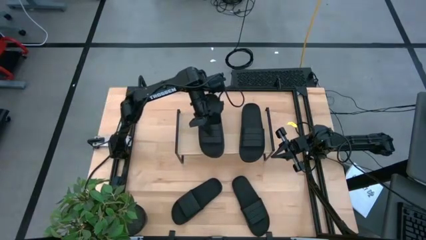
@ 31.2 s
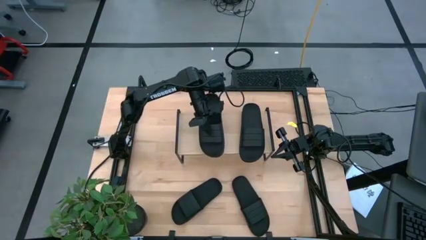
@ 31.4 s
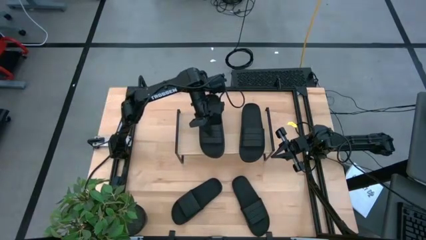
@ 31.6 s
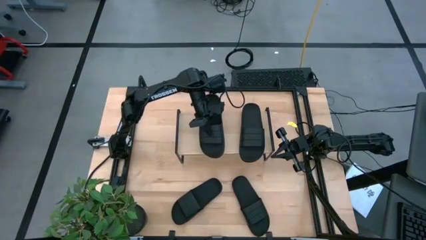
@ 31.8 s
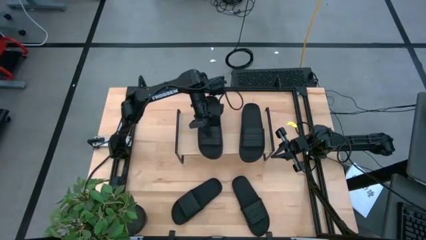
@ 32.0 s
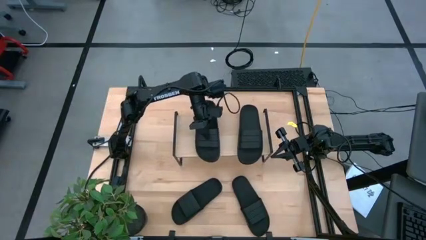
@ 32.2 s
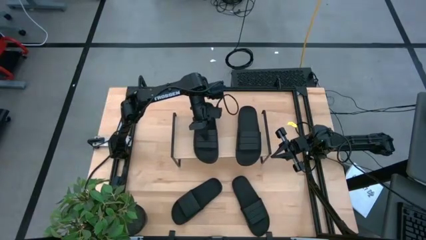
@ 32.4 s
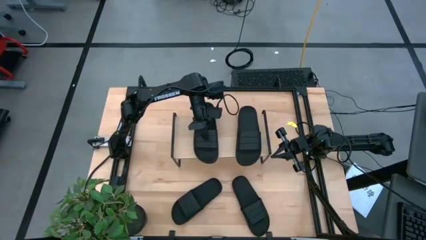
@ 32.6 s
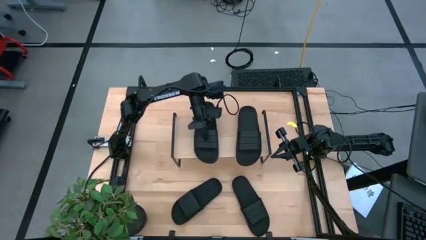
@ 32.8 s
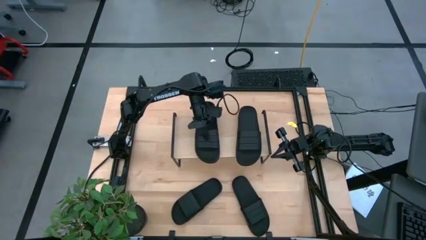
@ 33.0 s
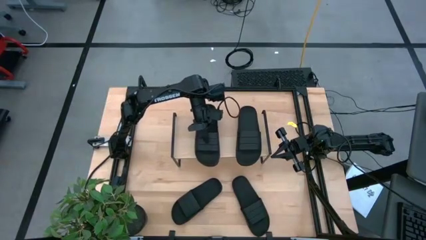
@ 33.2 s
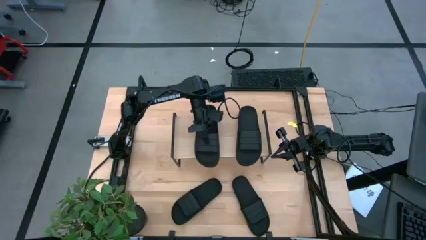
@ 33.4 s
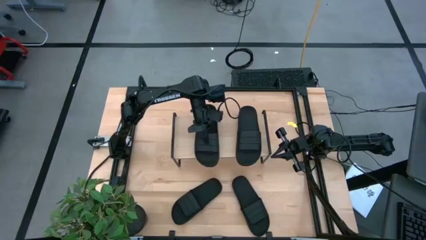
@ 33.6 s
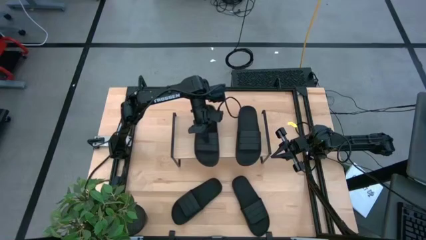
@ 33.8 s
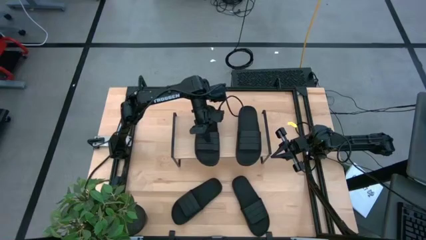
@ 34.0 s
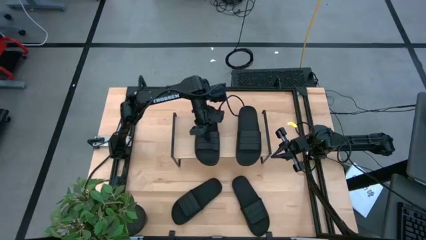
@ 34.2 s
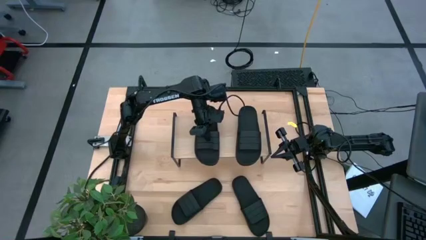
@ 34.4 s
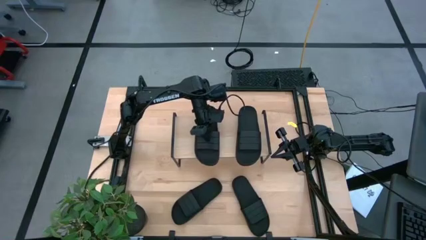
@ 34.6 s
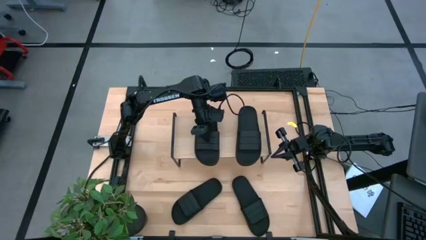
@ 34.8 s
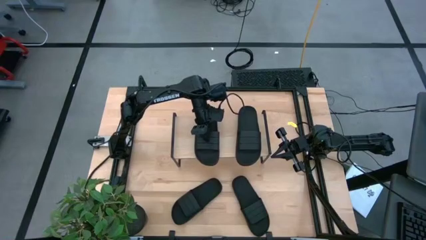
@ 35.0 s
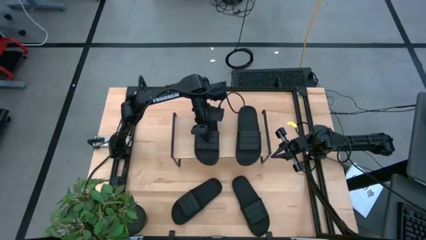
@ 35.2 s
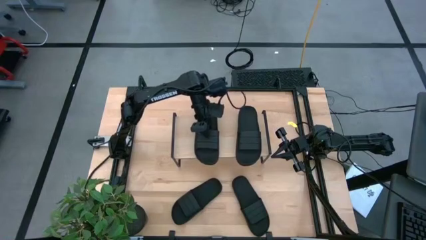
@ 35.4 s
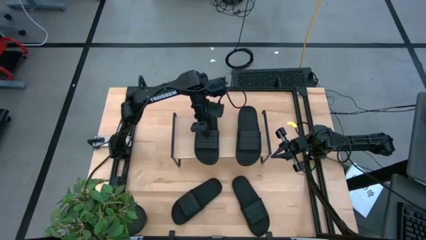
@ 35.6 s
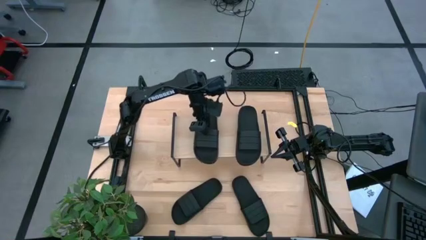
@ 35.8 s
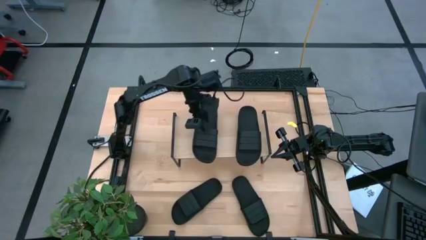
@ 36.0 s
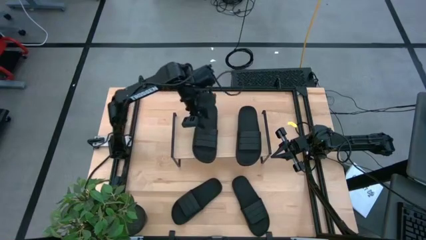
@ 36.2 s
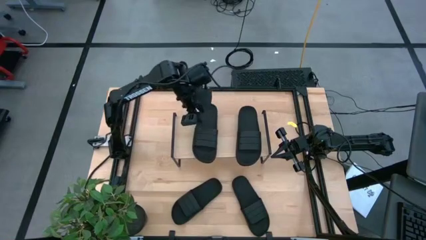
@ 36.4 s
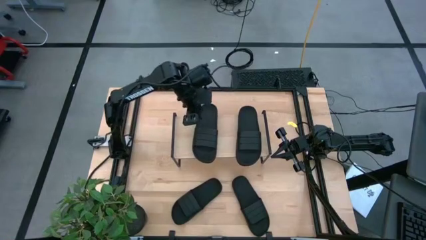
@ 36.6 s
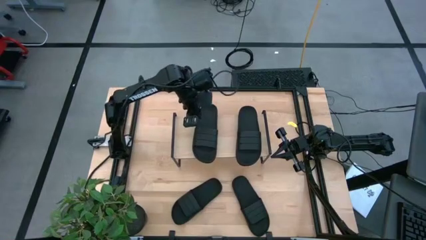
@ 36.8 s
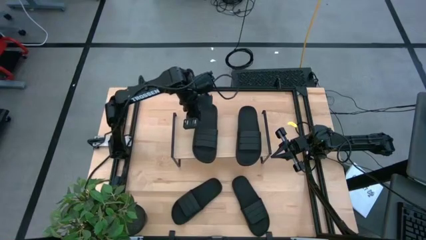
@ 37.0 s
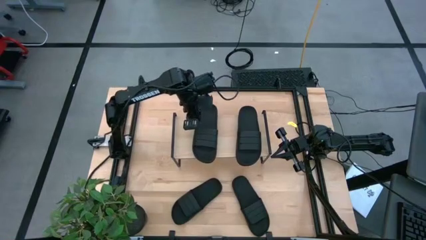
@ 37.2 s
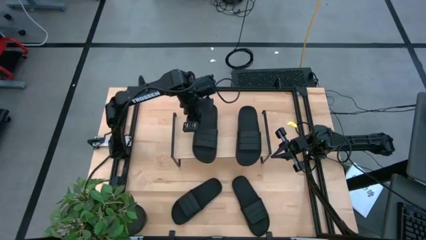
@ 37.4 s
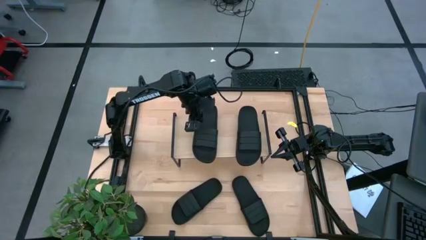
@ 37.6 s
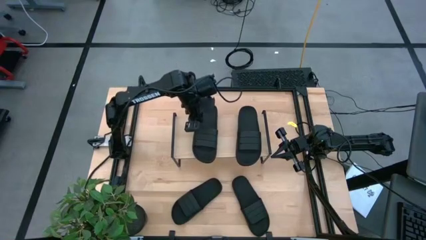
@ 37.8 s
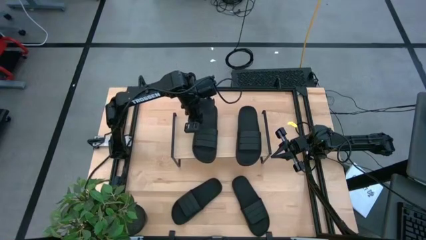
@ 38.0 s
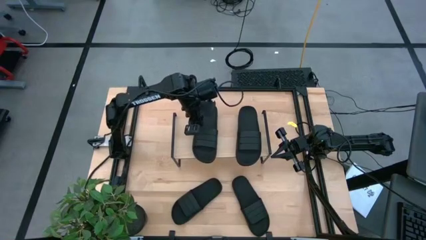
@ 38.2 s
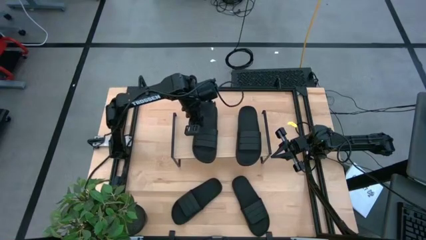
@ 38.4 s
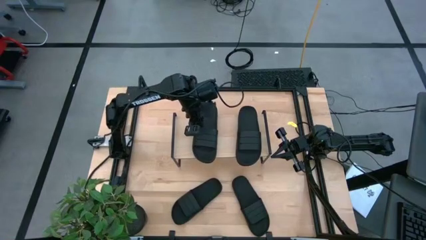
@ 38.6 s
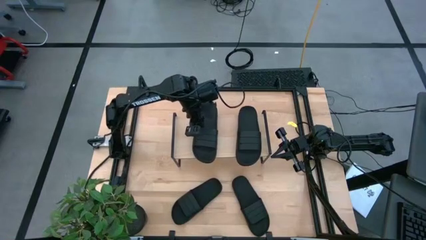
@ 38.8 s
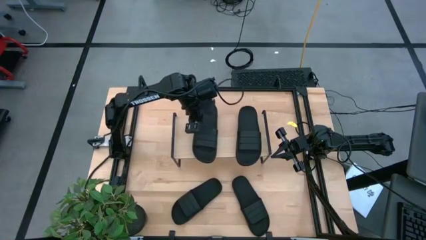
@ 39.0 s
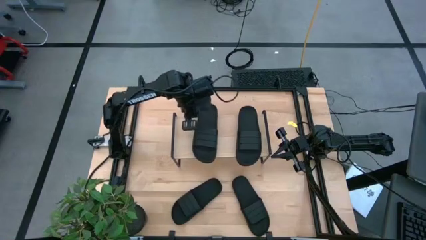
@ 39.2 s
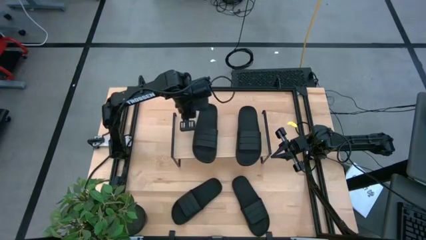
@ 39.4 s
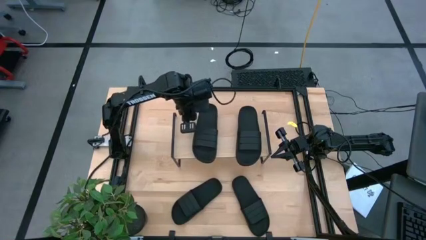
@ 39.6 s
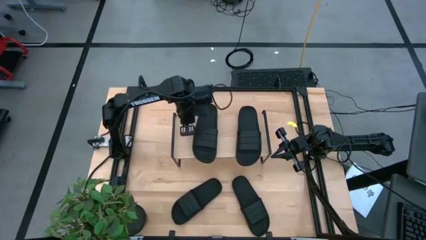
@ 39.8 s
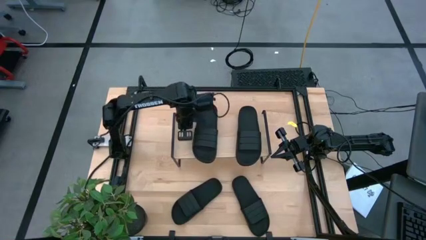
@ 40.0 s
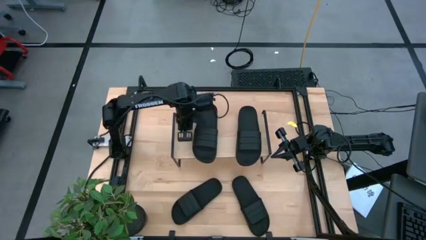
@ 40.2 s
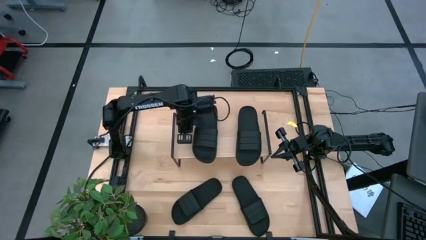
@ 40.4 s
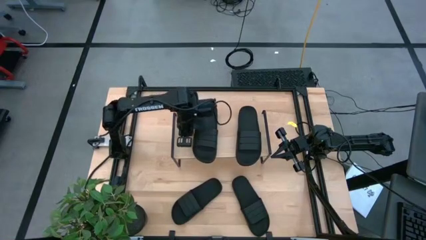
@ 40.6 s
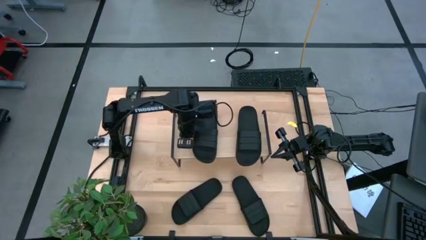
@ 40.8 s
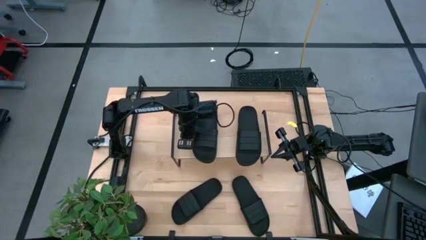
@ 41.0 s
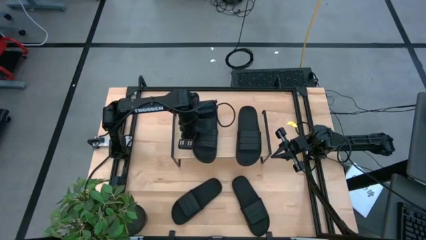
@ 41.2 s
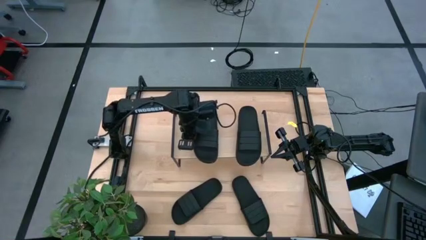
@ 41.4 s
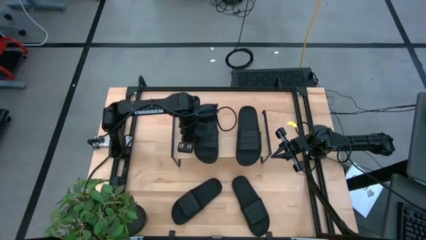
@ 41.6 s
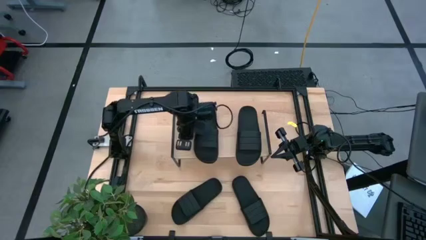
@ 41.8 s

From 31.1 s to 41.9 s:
Task: Pick and place slides into the shelf
Put the left black slide on the shelf

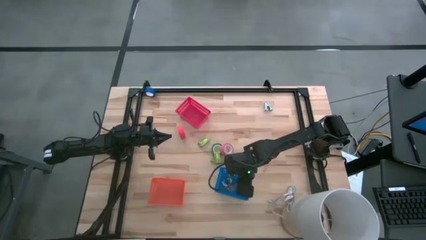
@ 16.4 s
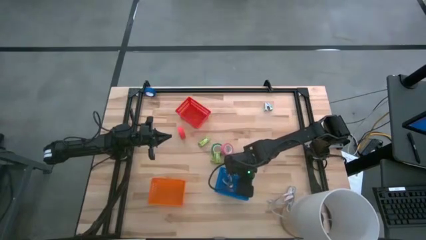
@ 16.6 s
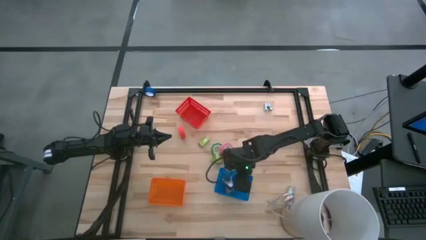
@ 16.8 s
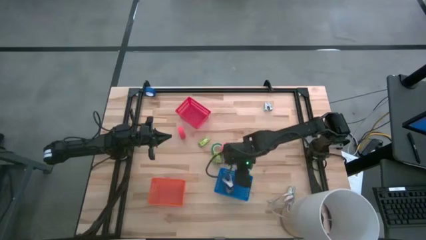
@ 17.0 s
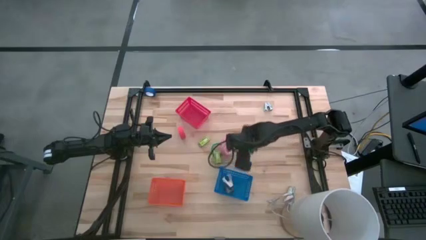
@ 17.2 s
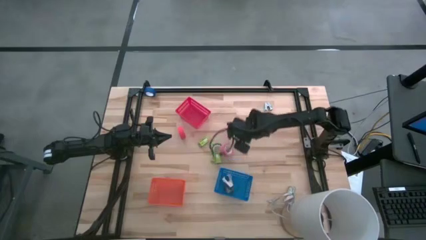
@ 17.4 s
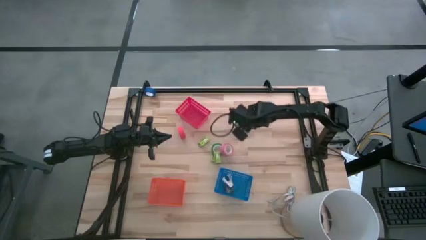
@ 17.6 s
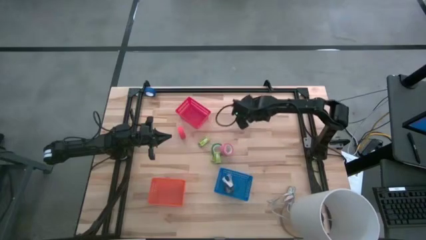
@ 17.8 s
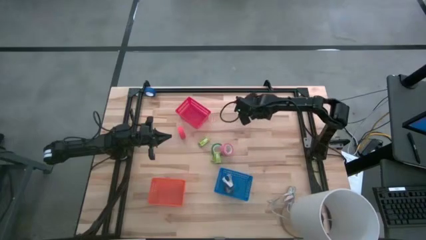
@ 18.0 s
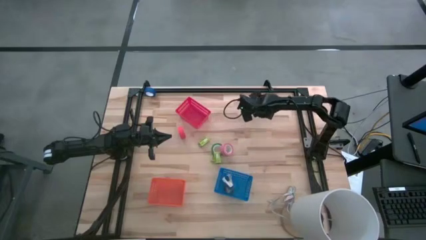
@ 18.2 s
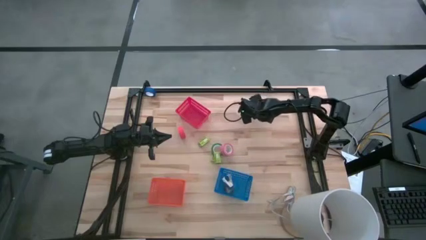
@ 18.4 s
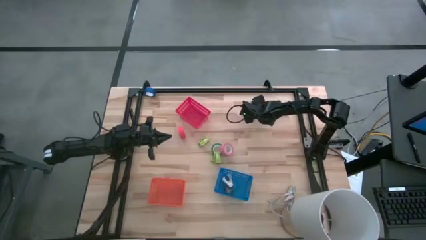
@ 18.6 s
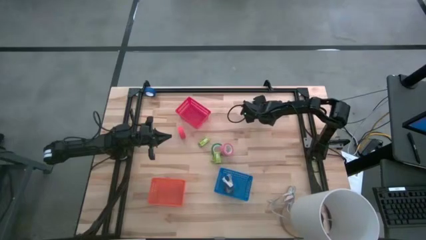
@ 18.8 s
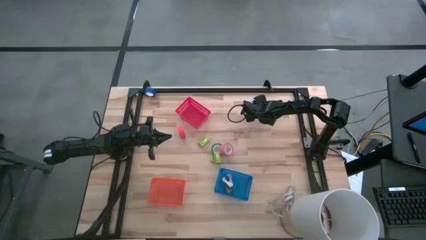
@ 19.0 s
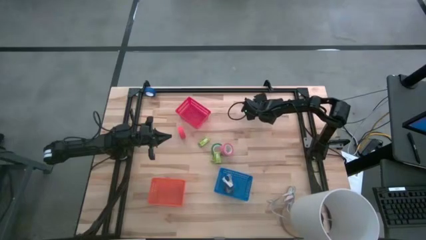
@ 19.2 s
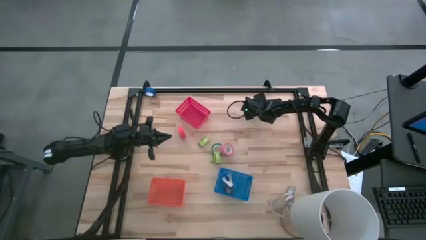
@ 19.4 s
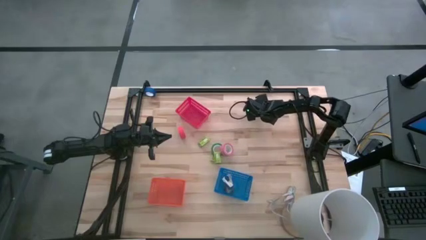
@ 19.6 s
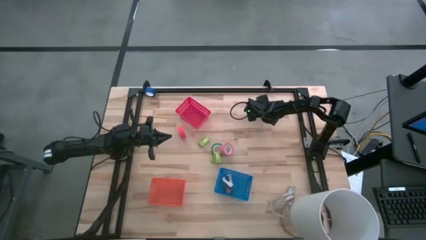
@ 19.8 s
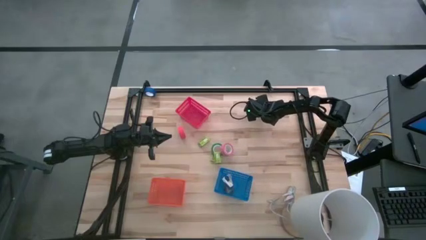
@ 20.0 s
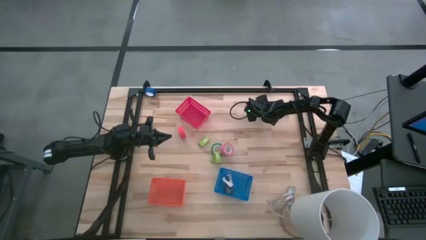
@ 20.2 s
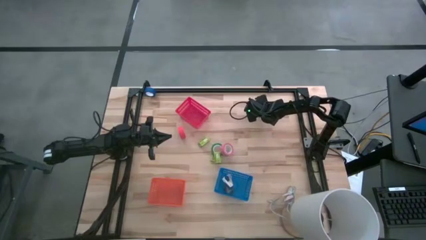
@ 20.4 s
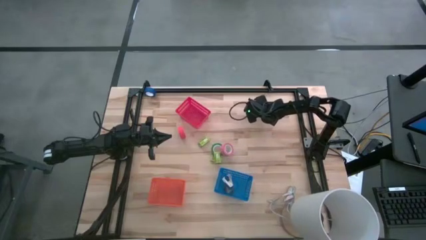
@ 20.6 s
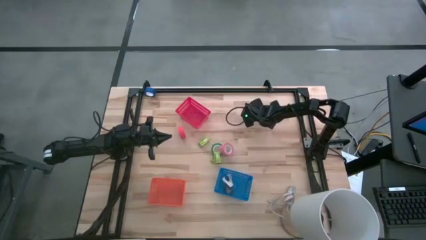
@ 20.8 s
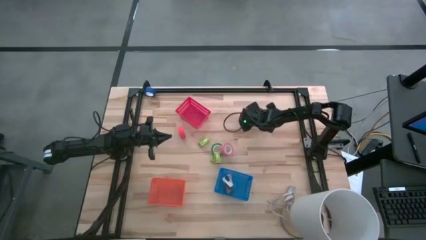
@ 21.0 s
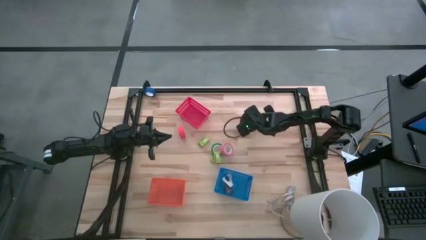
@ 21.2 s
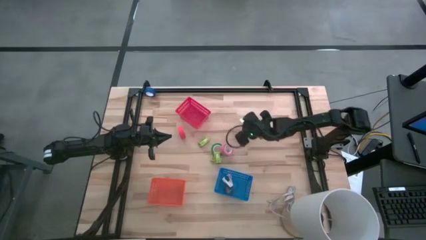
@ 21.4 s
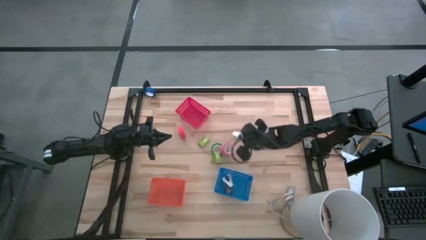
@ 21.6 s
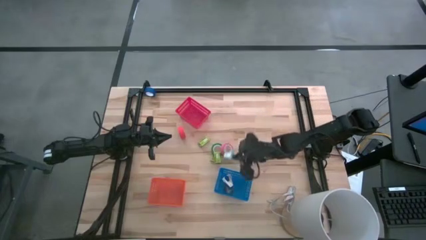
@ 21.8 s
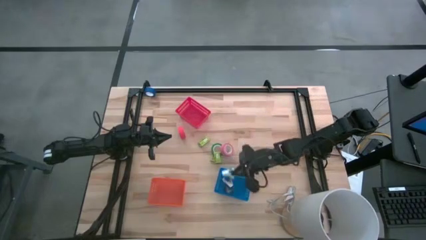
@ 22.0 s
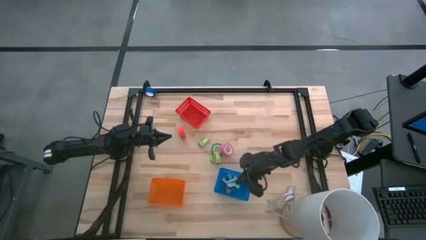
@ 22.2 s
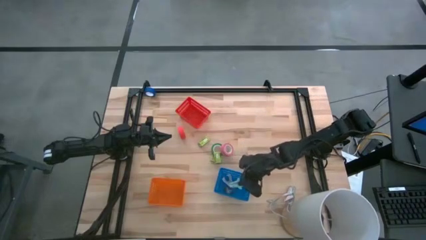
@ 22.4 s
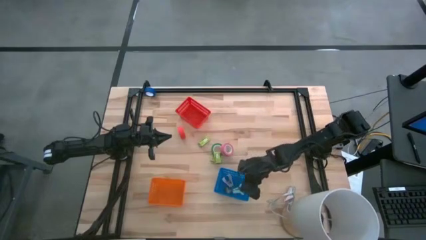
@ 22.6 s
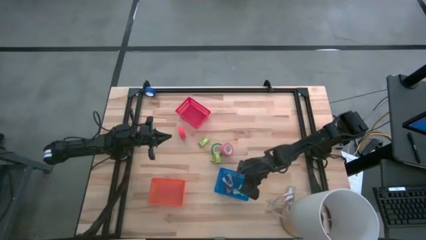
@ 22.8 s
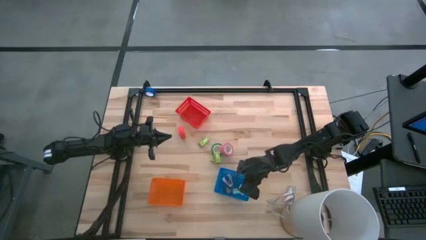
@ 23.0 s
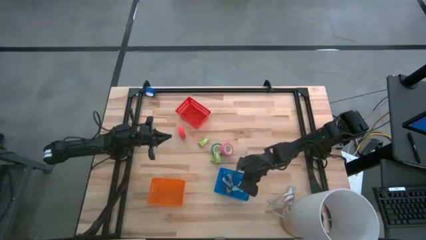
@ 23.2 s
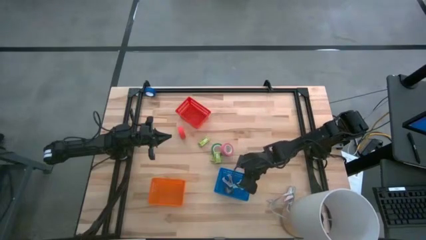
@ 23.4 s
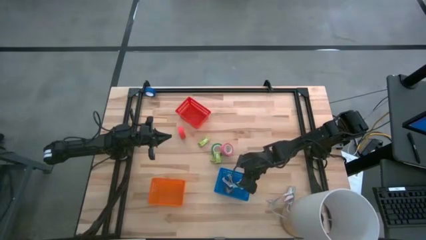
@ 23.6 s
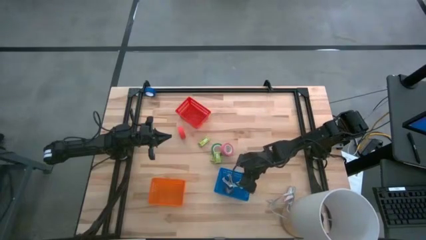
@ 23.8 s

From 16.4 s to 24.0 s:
Task: Pick and place Stapler, Stapler remover, tape
Put the blue stapler remover into the blue bin
